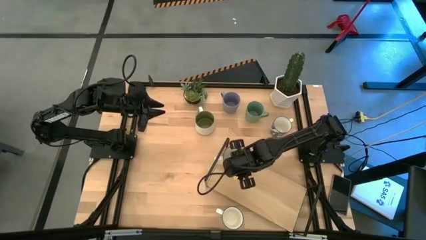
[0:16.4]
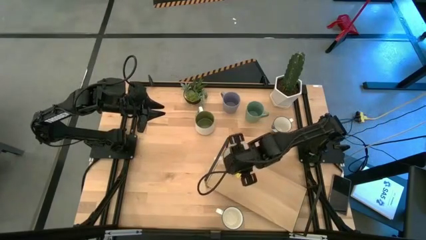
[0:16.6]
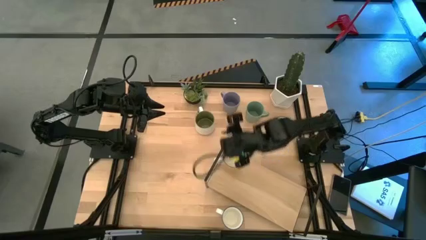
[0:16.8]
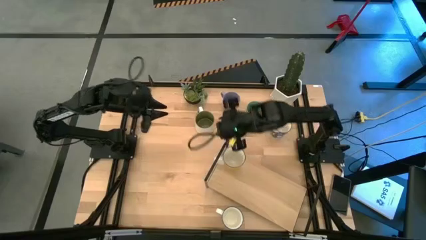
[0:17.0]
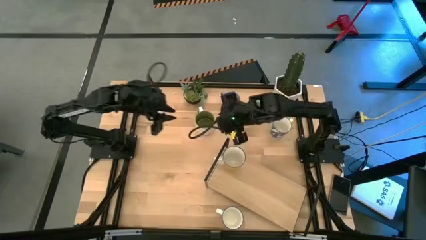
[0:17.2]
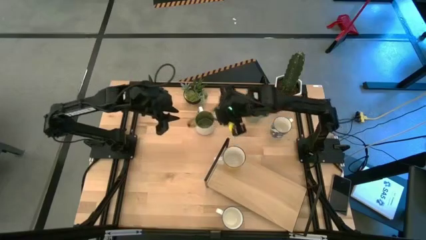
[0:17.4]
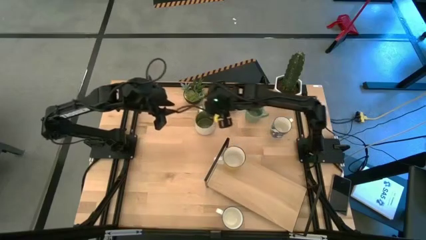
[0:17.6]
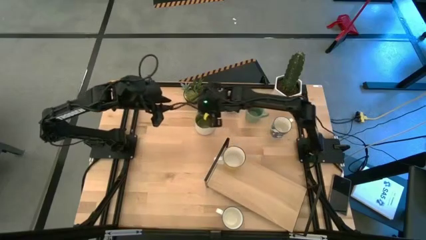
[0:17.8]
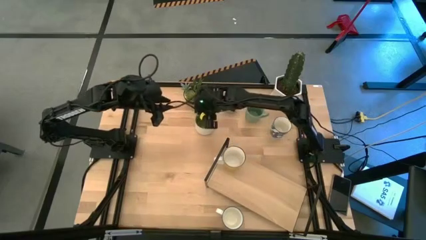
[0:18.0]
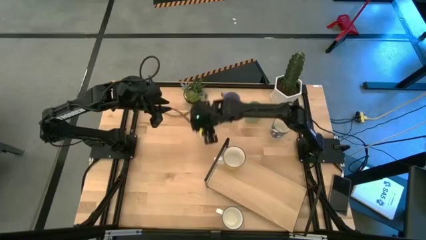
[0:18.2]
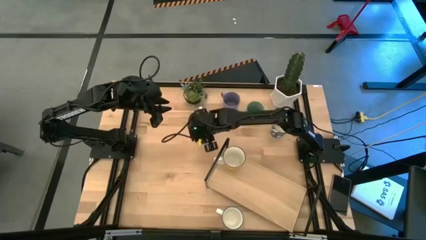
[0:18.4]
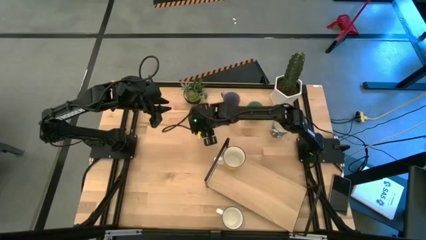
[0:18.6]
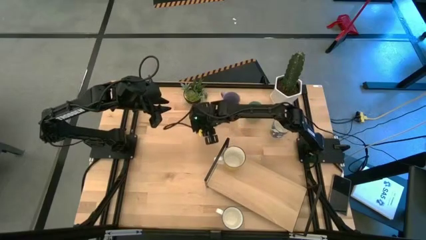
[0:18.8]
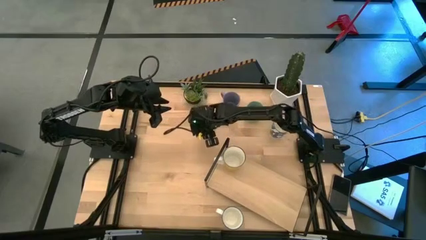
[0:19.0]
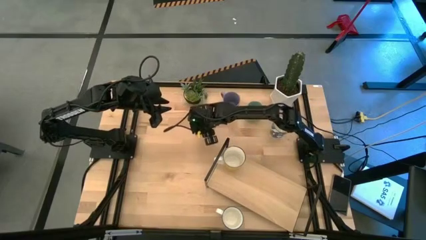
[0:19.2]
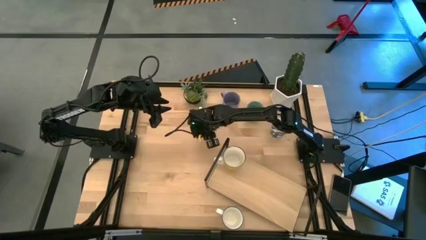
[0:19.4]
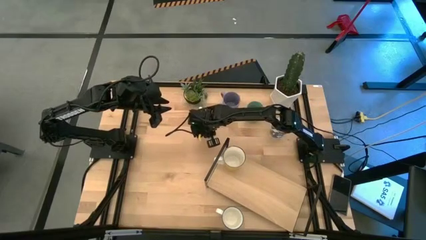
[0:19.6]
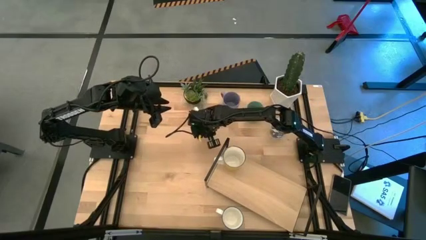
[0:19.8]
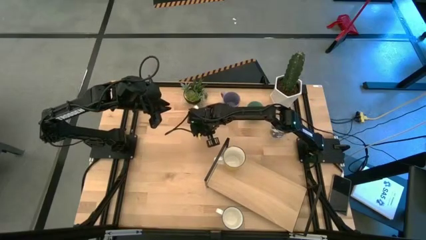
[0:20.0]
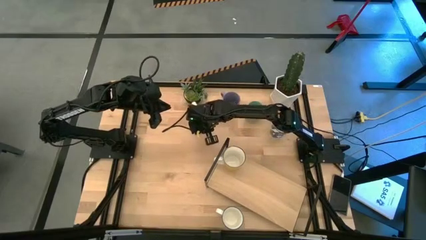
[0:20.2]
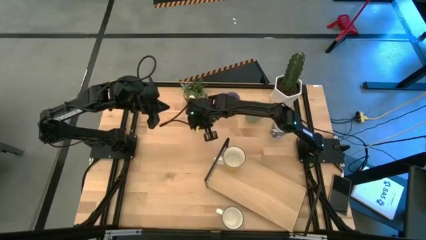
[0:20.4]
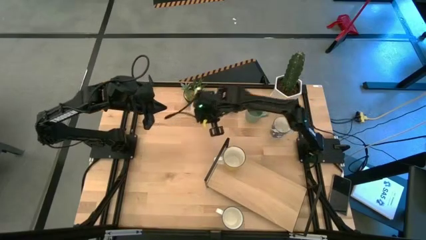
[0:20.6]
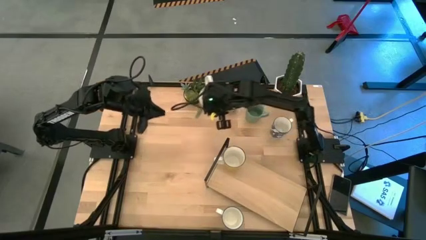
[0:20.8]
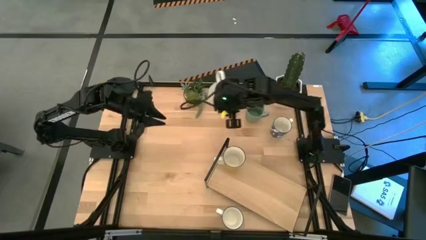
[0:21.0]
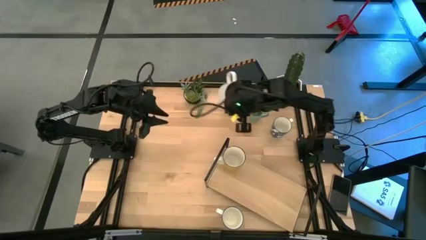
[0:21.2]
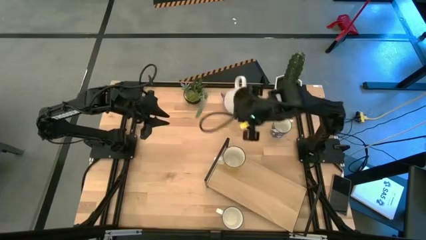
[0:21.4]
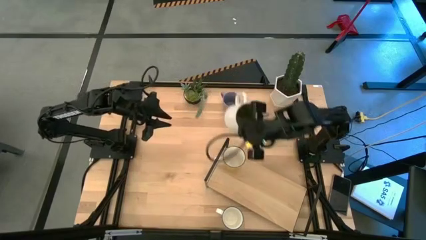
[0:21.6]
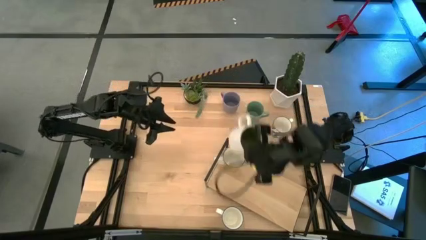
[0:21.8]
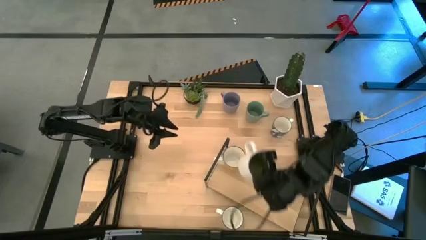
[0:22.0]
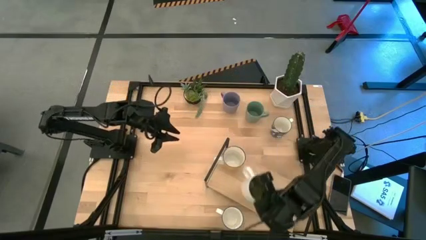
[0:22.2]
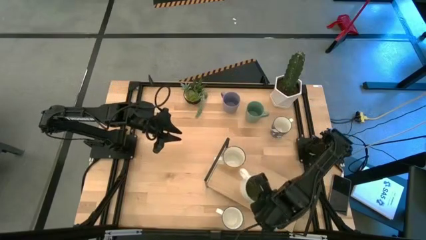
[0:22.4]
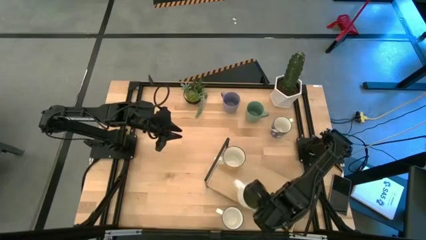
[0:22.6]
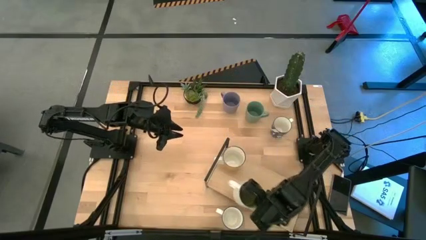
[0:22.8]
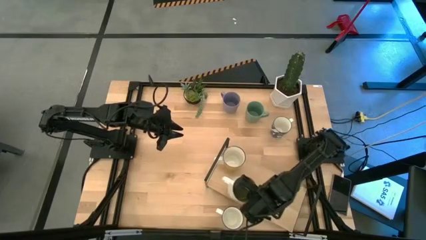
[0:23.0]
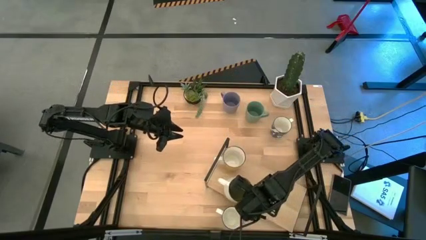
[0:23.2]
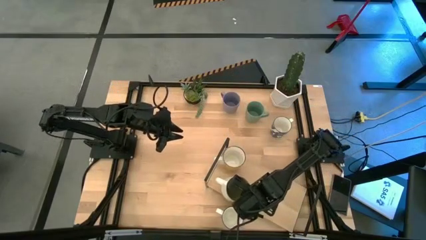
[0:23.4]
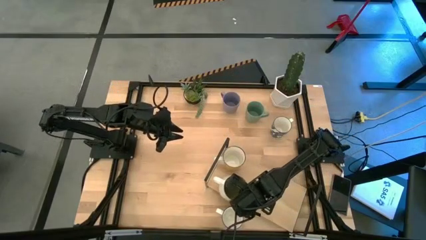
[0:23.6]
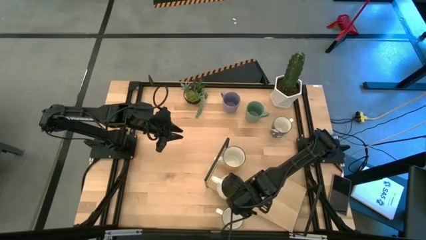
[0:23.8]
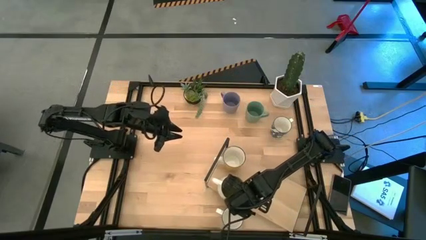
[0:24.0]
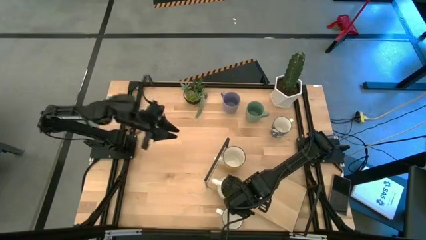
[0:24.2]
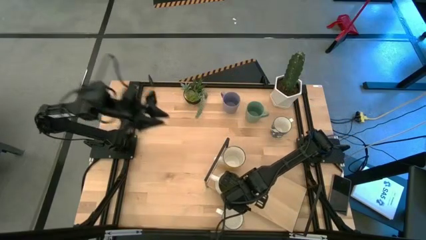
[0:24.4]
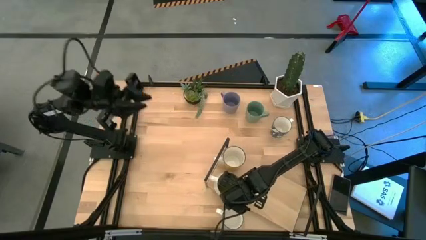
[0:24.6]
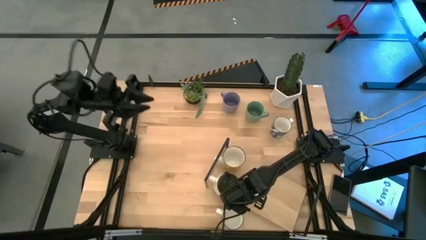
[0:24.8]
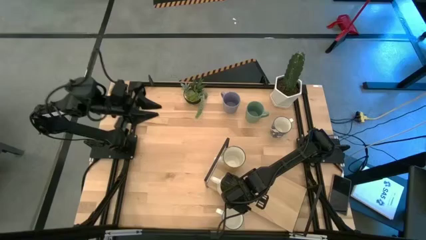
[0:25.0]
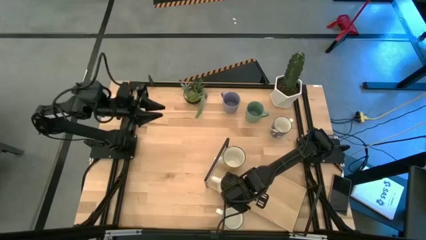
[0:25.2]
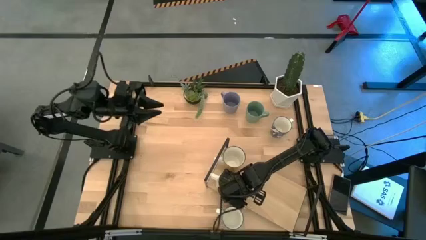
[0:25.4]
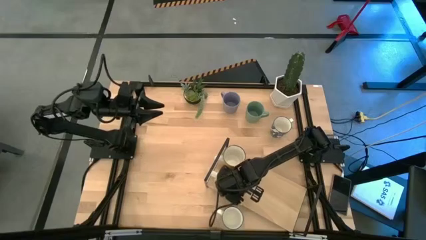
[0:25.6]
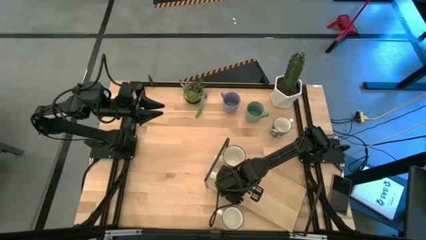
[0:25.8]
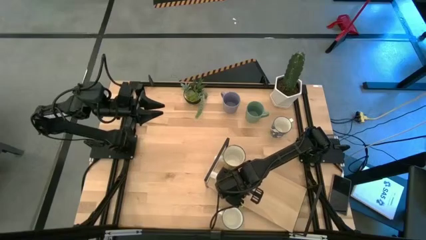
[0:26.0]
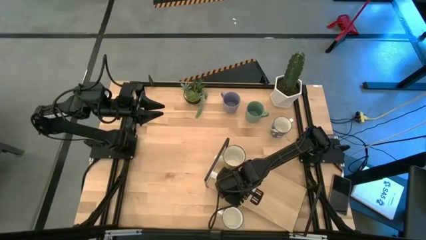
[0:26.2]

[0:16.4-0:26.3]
Task: Place coffee mugs
Put the white mug on the shelf

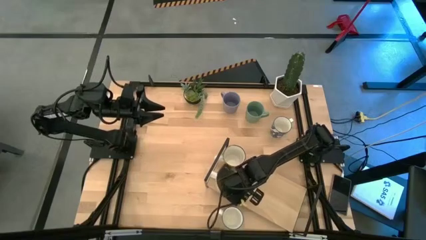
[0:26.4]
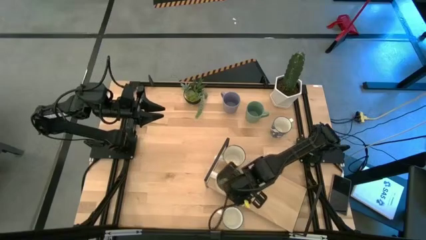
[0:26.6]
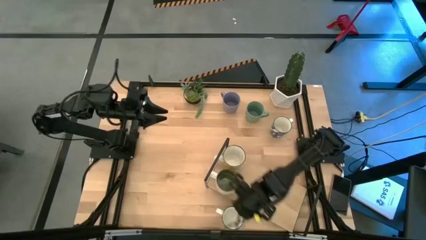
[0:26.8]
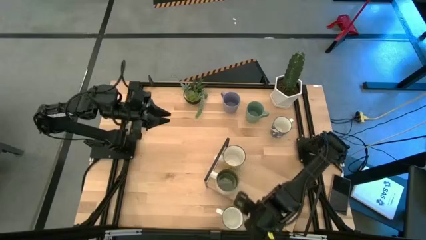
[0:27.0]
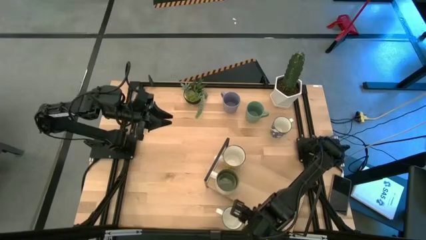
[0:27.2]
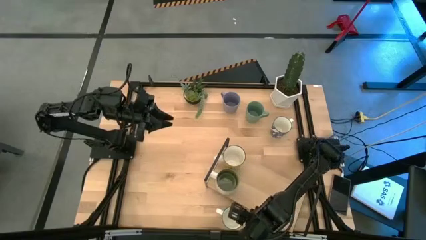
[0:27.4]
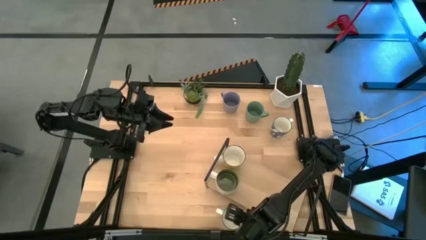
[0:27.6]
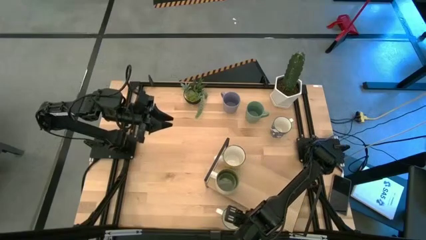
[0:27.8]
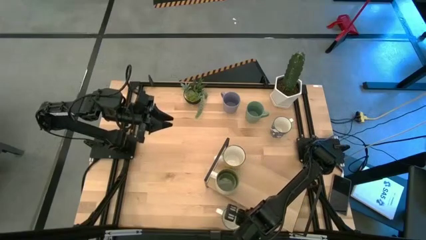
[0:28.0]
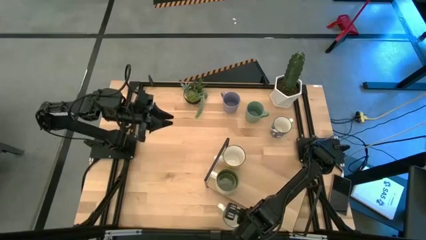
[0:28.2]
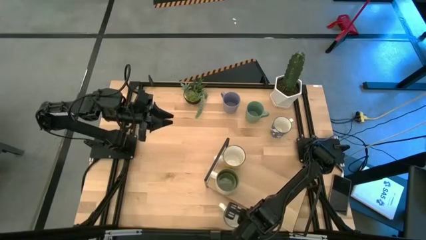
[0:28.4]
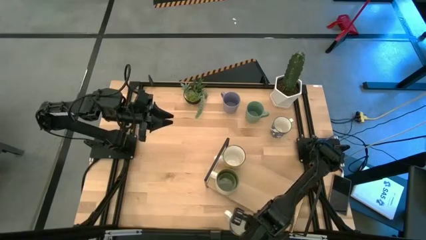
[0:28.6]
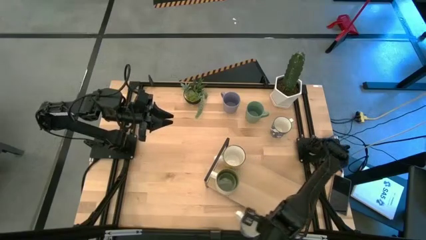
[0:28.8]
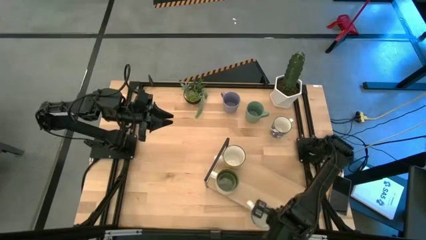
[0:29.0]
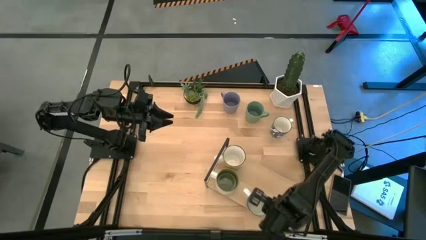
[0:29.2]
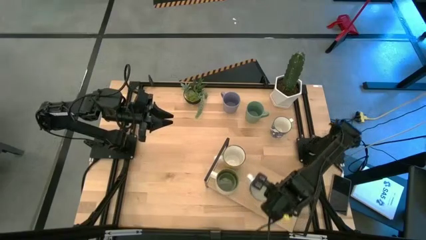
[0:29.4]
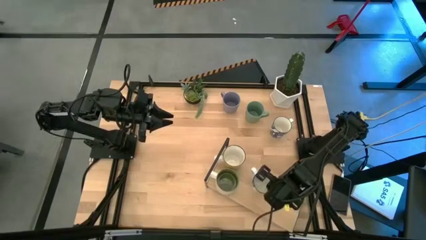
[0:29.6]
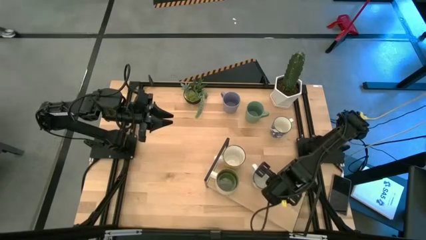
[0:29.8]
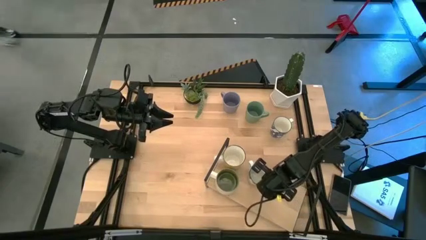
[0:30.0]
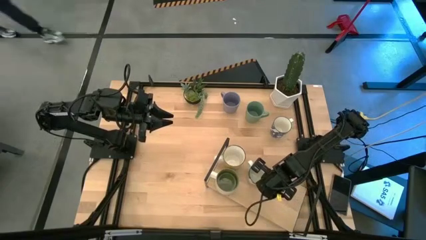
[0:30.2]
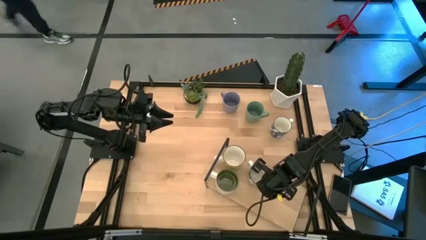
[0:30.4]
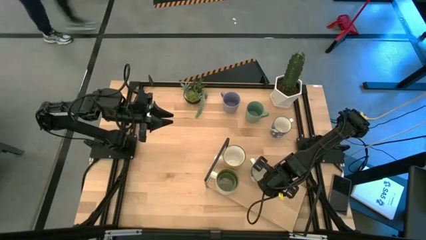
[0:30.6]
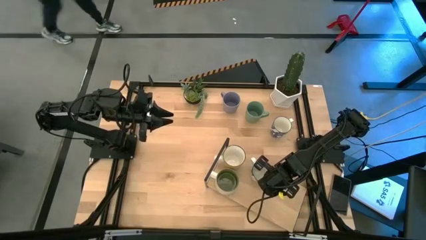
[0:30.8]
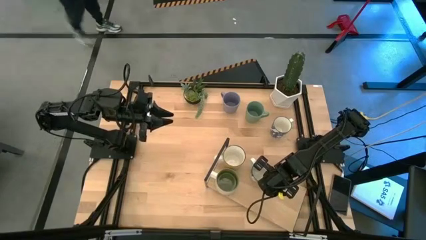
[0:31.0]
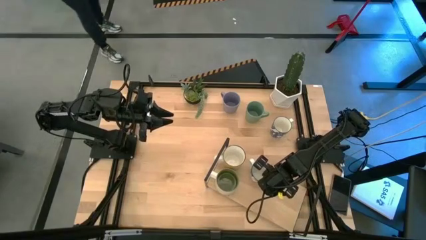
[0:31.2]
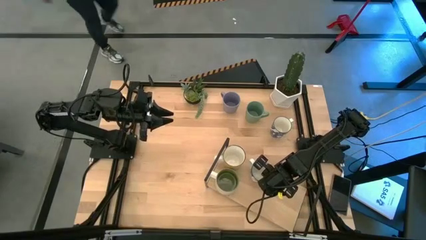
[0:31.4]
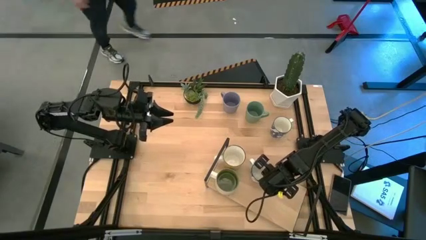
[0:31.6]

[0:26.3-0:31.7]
Put the bottom blue pattern mug on the shelf
